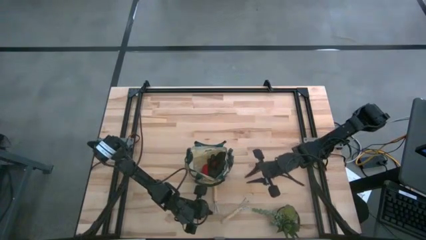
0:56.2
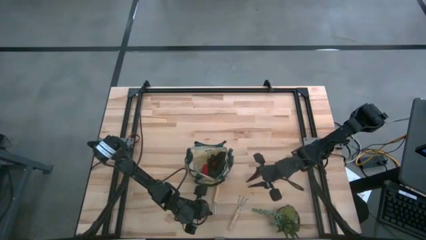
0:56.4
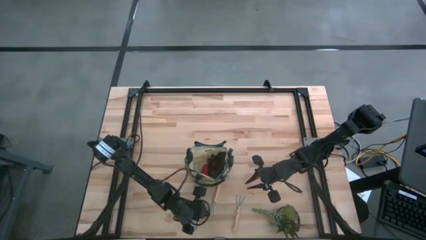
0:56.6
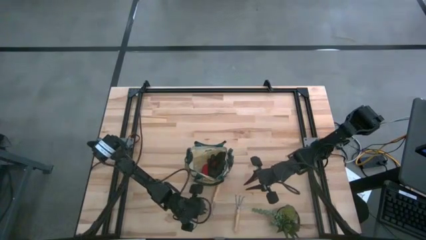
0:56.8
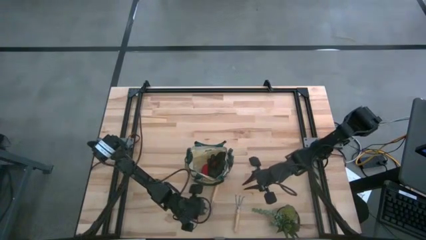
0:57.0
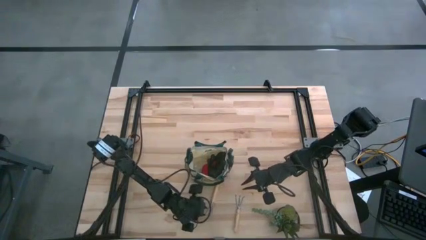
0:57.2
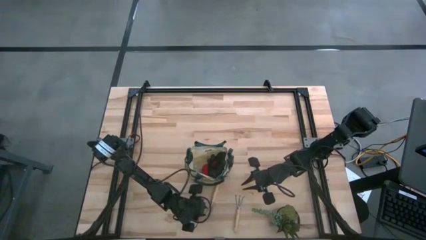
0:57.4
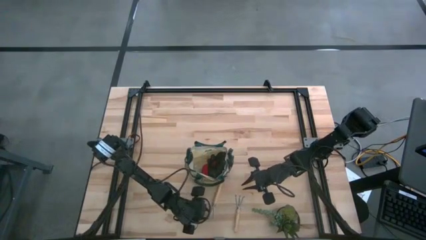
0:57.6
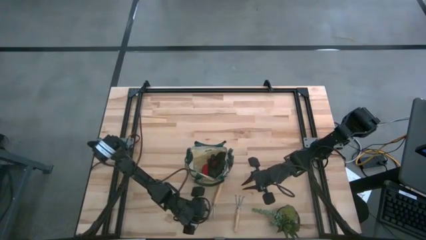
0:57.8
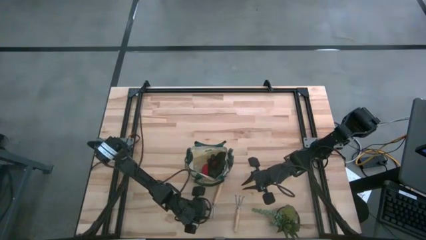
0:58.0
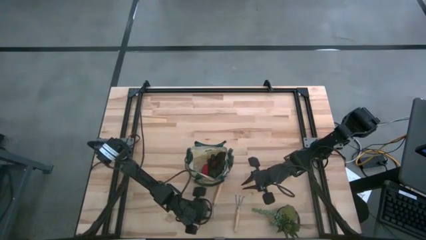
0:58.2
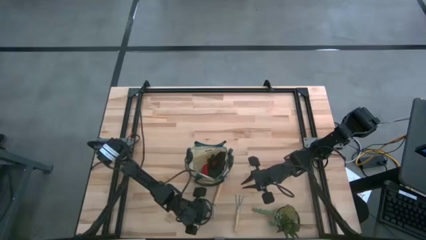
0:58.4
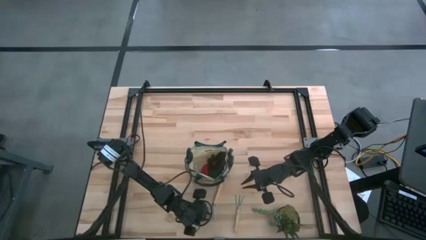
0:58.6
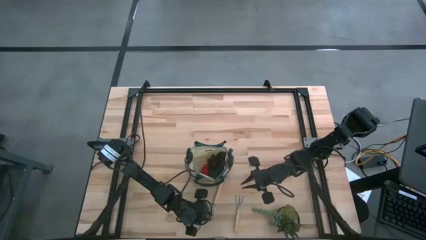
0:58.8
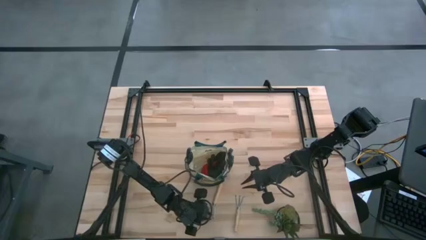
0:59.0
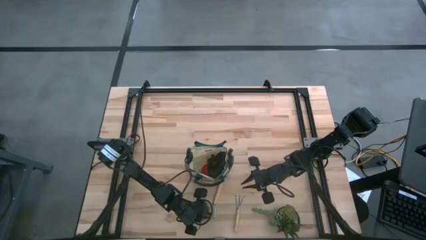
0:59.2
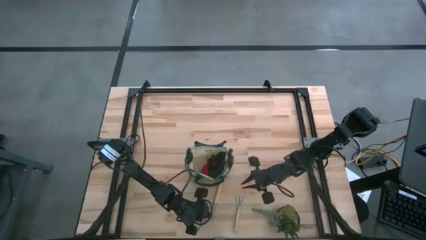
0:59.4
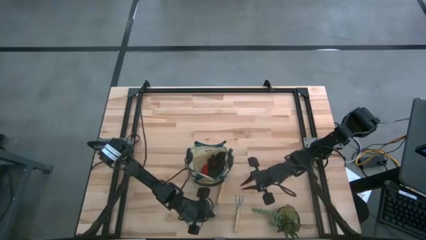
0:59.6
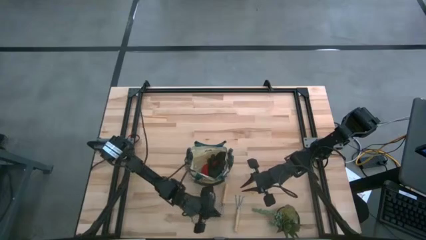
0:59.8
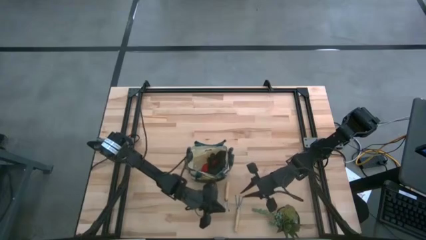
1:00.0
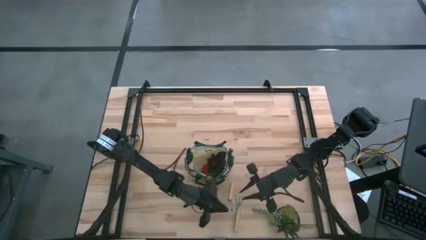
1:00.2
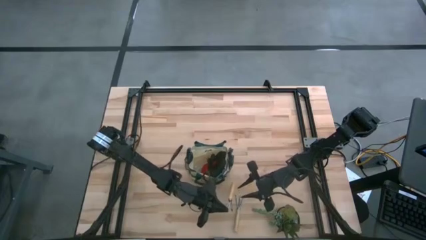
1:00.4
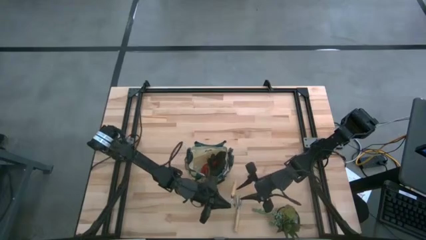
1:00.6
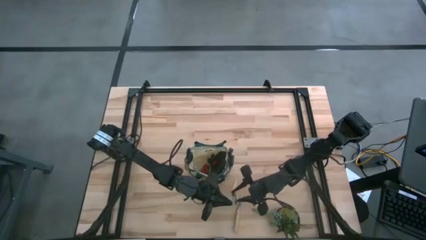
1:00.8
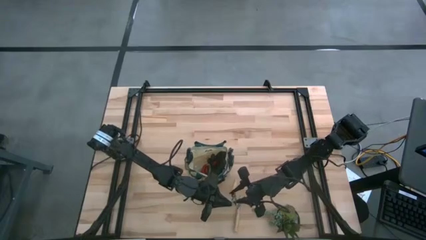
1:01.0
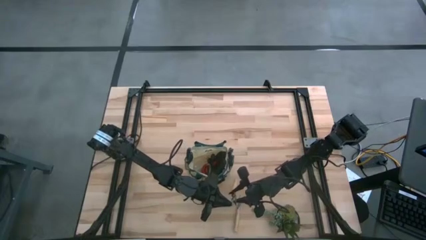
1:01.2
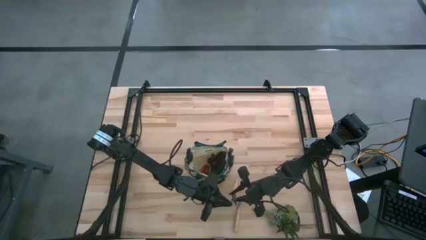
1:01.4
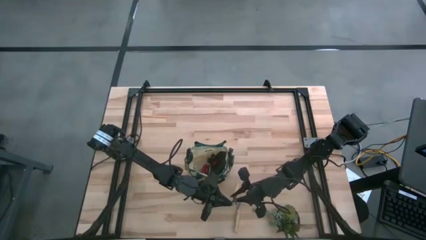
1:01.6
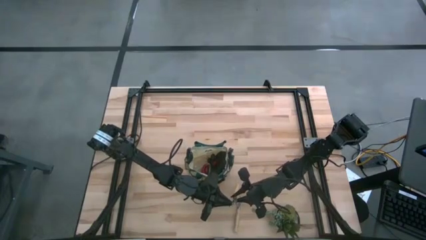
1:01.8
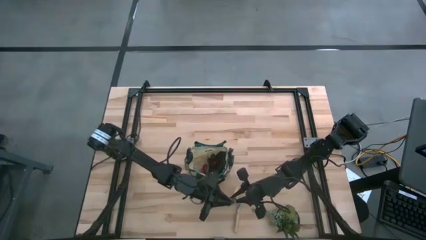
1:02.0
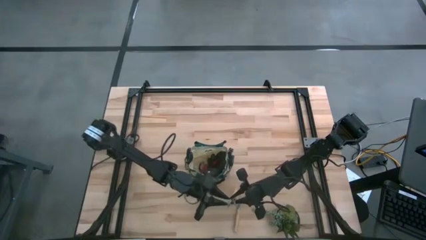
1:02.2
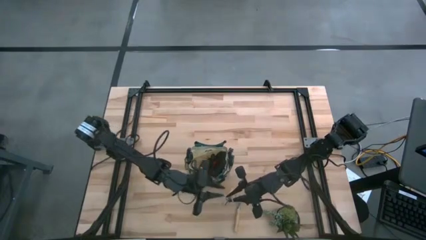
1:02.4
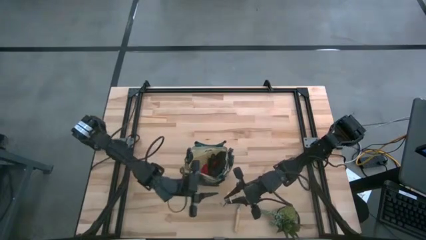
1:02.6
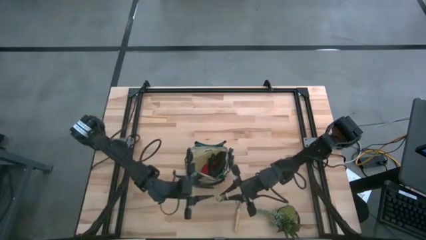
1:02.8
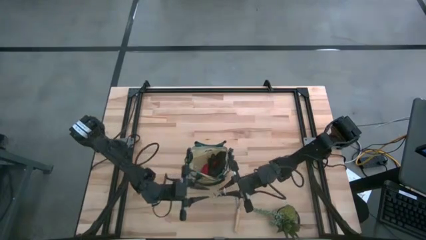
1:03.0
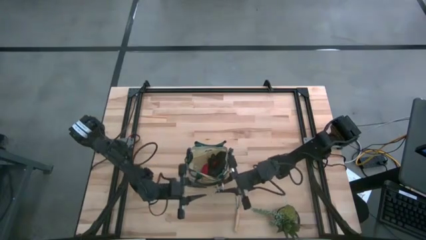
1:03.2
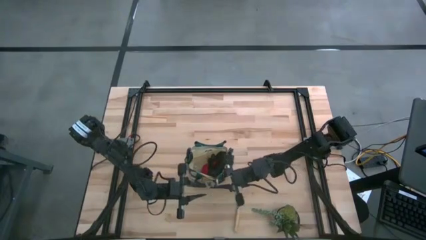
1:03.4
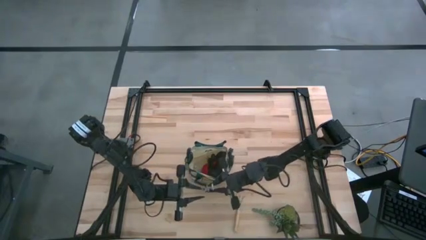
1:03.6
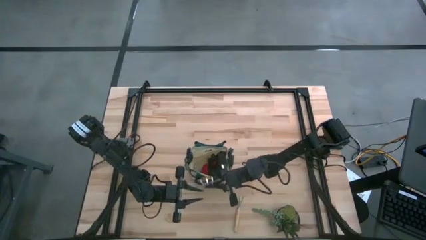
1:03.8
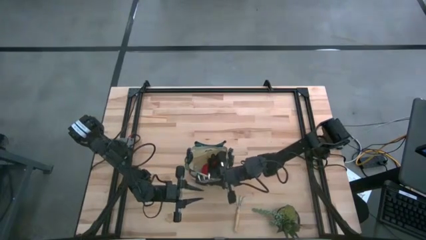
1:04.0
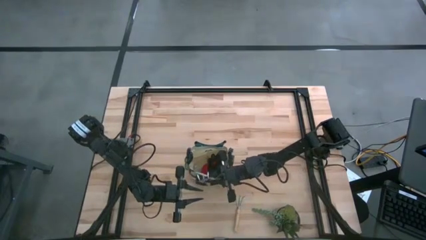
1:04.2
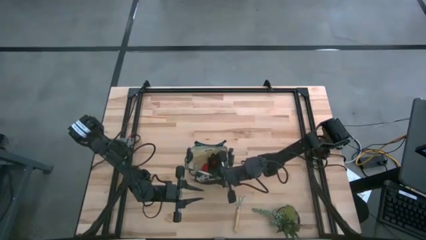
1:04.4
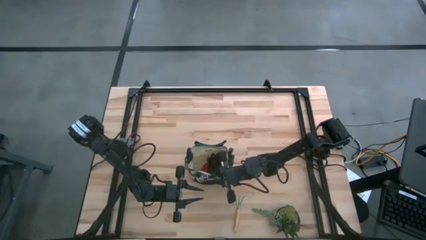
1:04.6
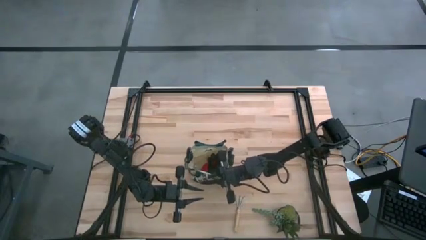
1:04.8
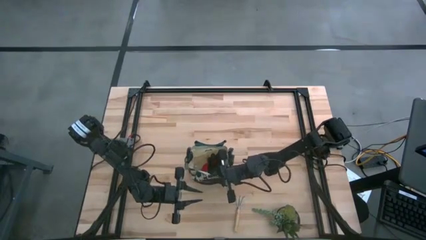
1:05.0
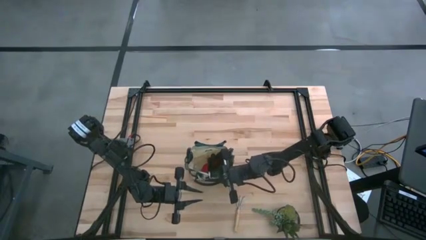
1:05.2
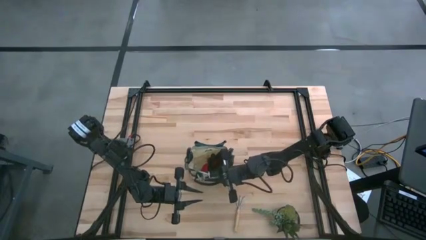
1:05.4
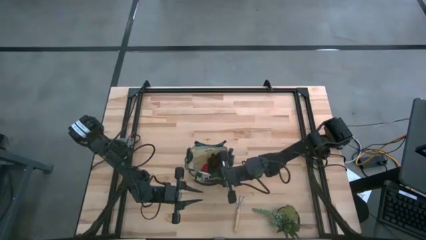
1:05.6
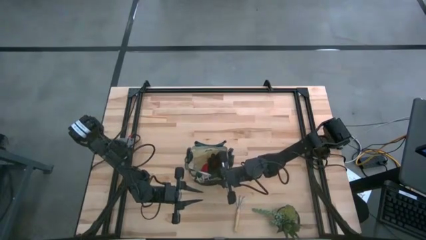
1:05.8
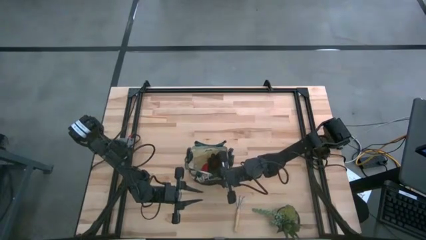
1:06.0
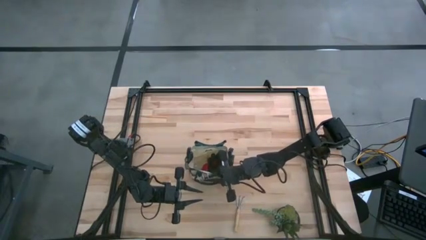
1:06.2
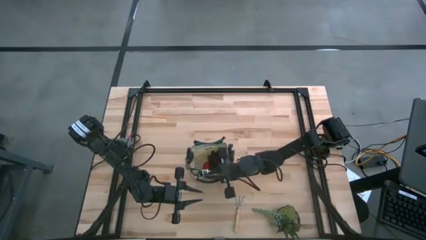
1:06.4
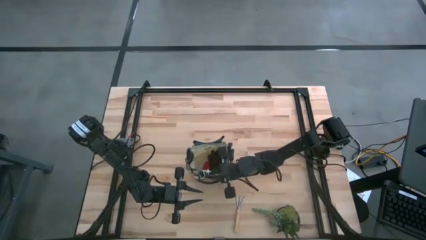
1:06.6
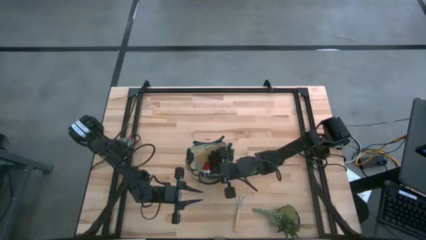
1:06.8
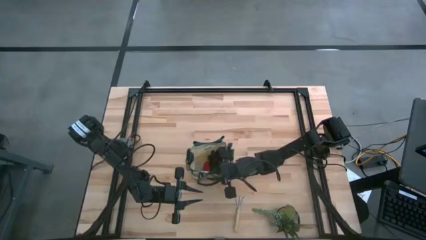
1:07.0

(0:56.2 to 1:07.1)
Task: Pick & Place Garden tools in Gardening bag
Put the brown hand rake into the gardening bag

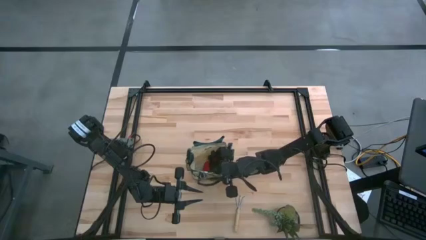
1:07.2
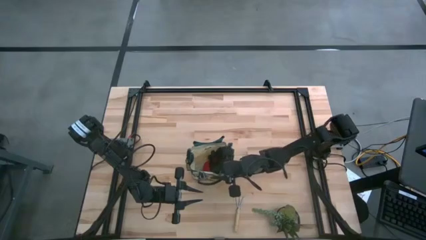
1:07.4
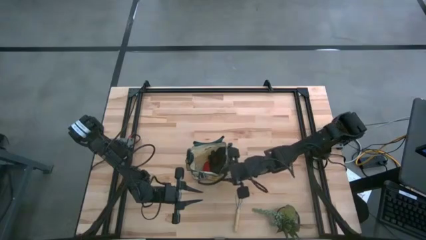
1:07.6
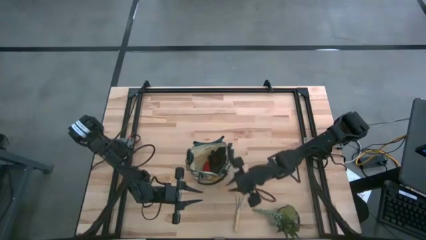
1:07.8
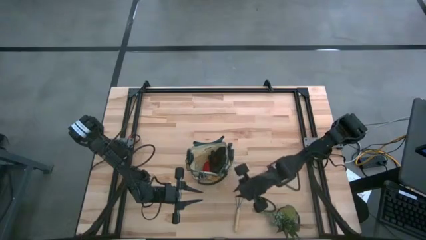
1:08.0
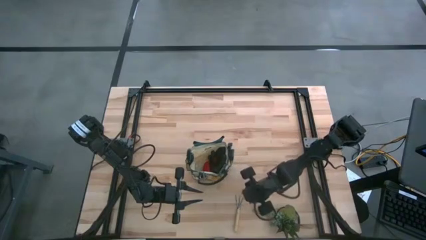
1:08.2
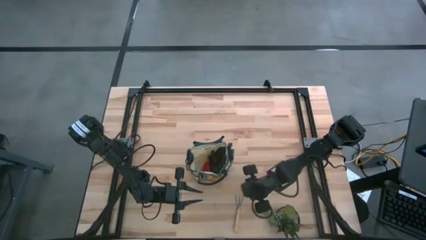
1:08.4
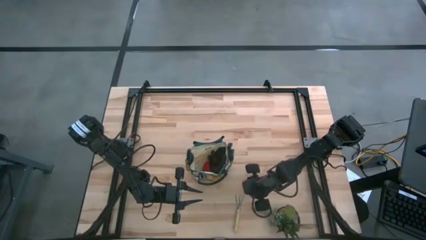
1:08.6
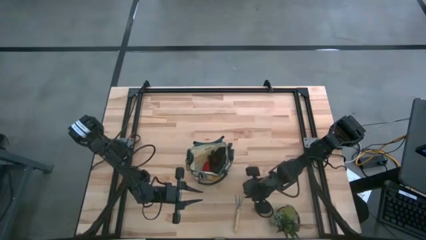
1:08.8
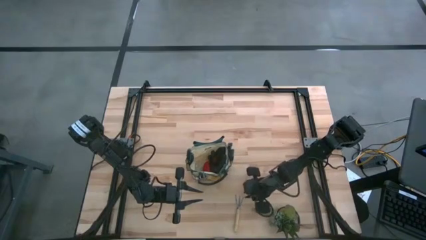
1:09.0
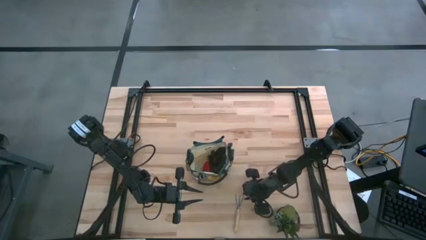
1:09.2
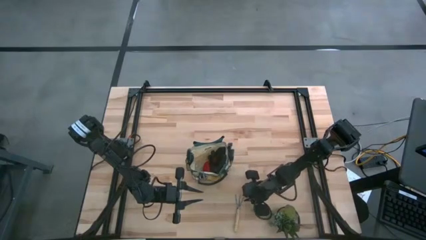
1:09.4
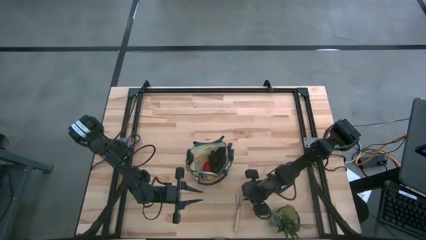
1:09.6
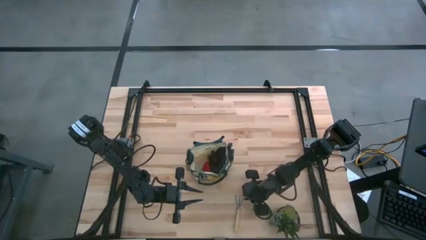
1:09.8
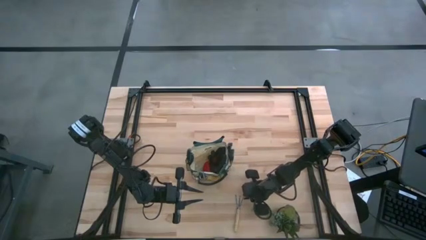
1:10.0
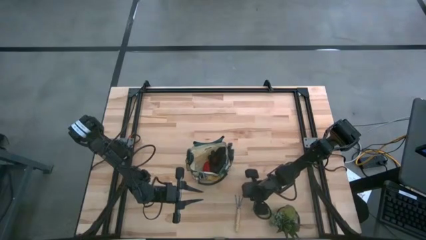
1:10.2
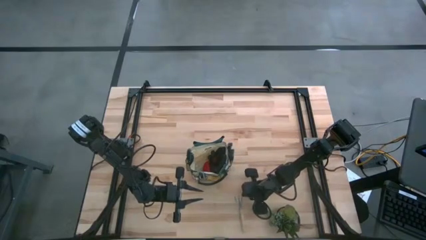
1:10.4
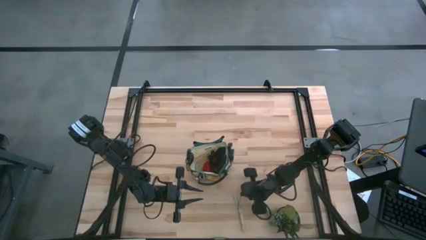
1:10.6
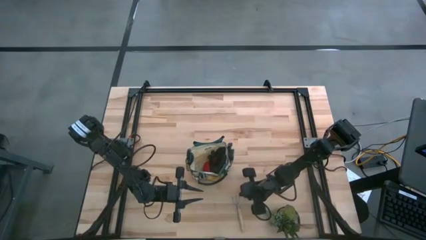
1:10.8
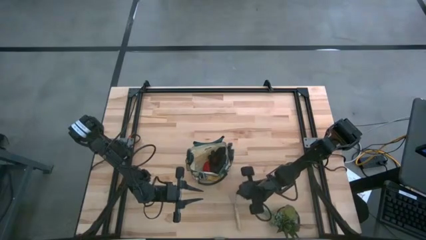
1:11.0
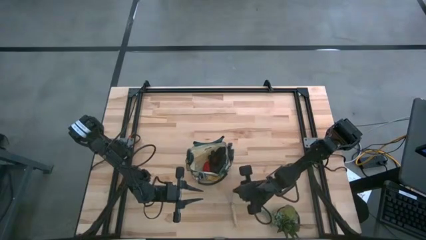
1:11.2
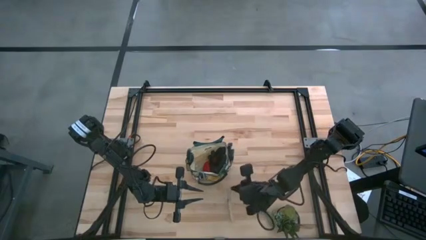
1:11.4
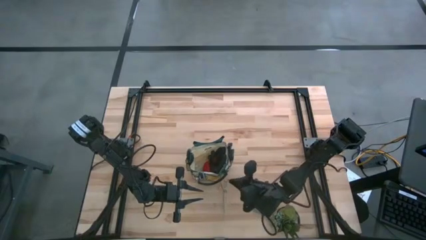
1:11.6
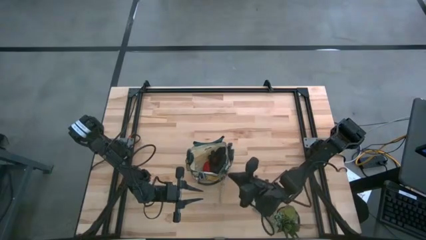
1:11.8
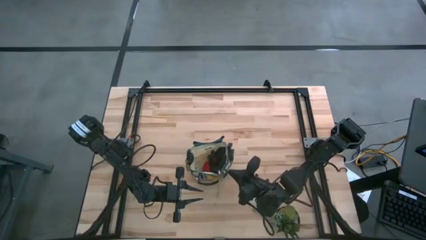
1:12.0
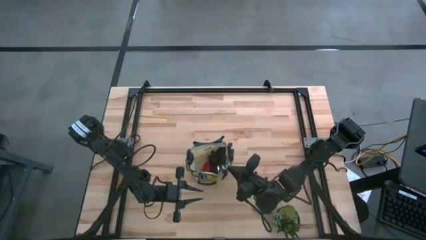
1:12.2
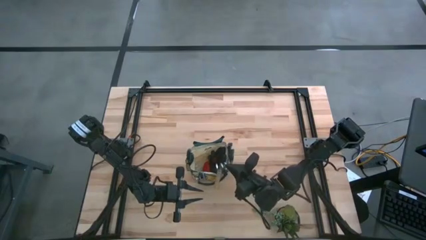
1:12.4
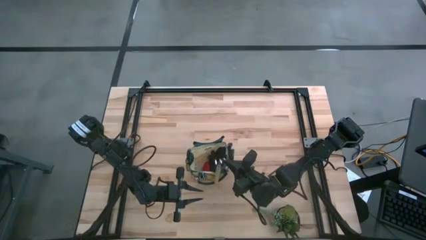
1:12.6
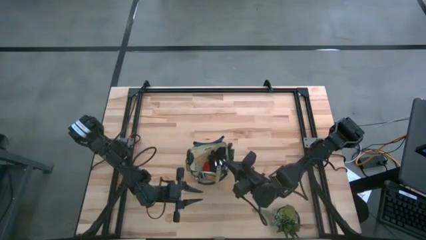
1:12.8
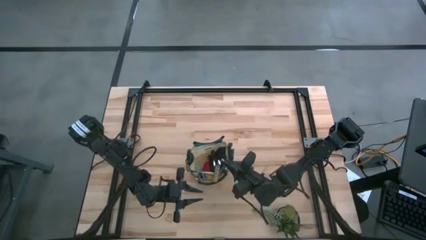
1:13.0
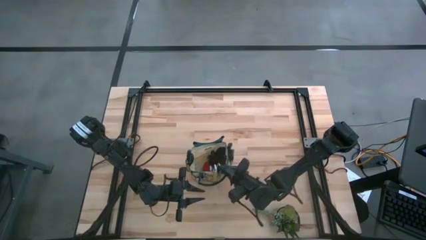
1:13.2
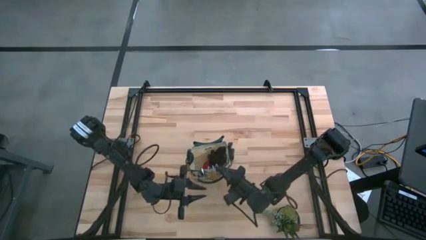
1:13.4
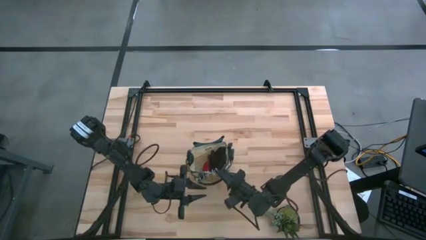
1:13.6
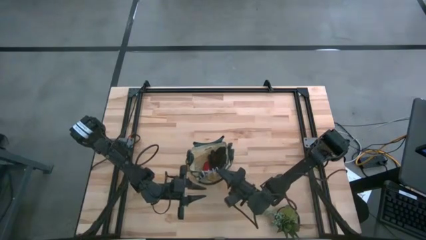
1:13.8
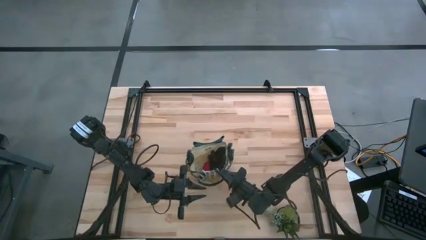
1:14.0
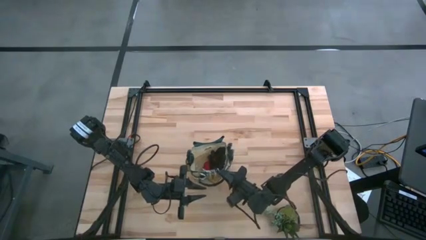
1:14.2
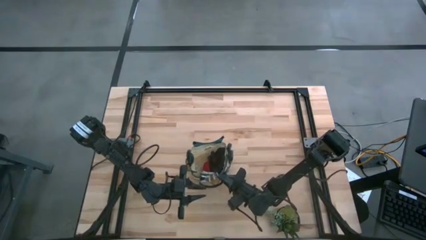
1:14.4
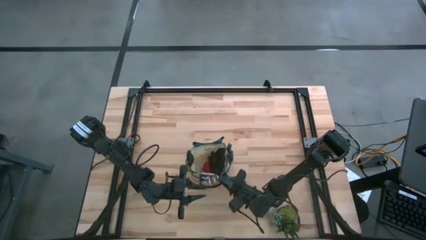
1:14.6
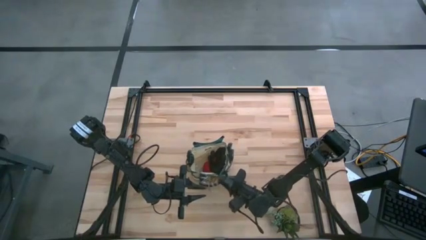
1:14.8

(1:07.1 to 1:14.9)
Put the brown hand rake into the gardening bag
